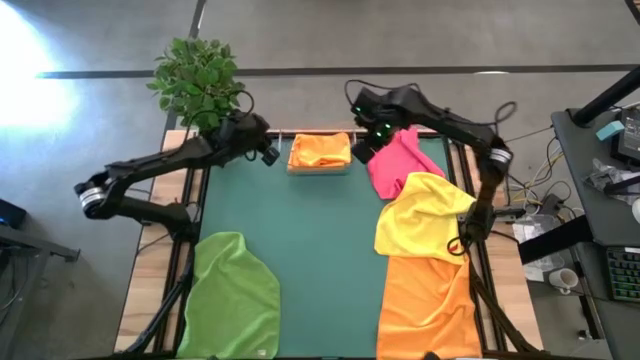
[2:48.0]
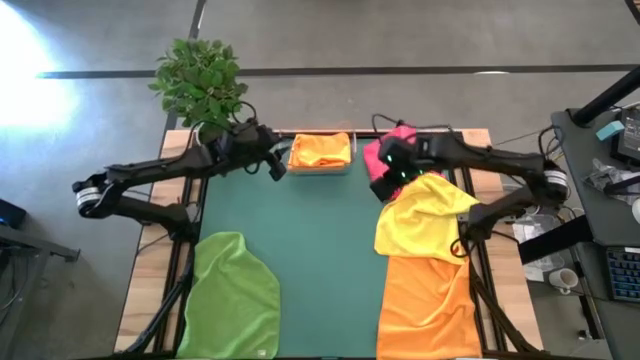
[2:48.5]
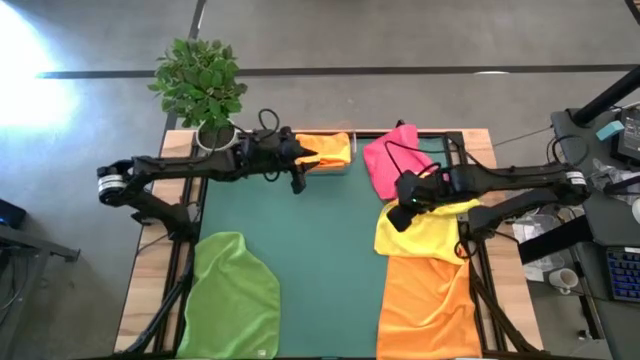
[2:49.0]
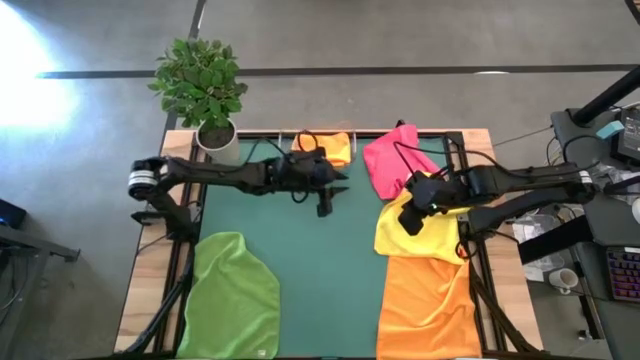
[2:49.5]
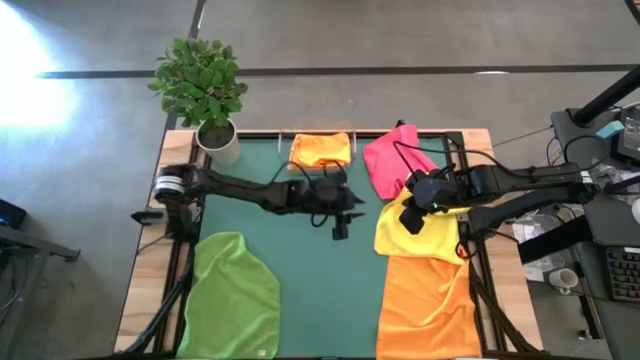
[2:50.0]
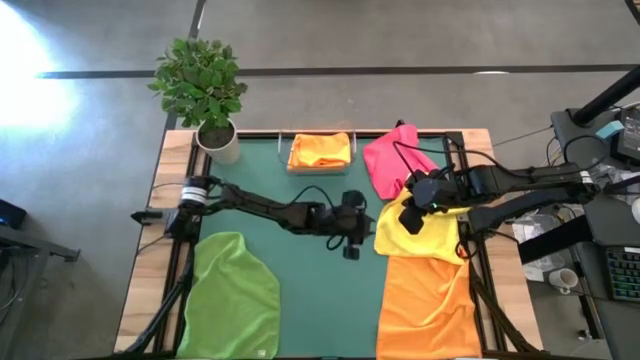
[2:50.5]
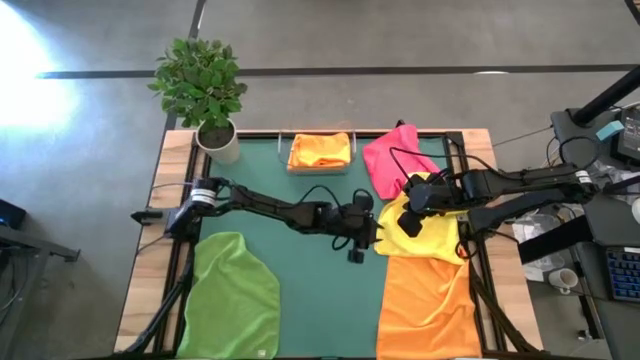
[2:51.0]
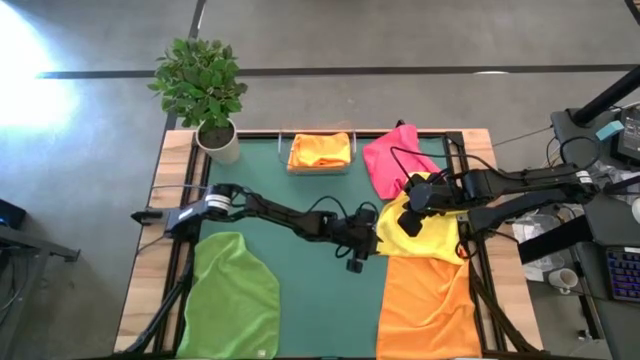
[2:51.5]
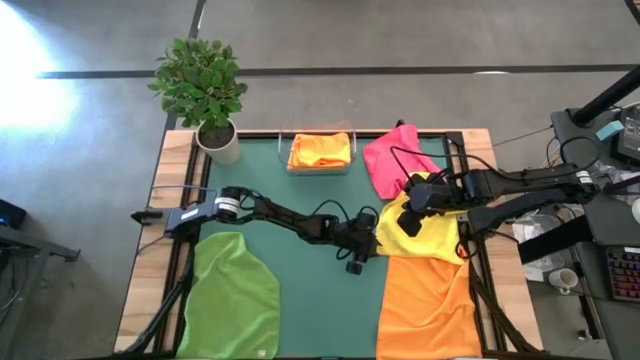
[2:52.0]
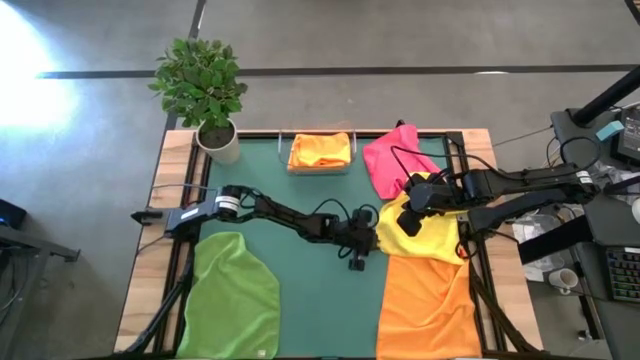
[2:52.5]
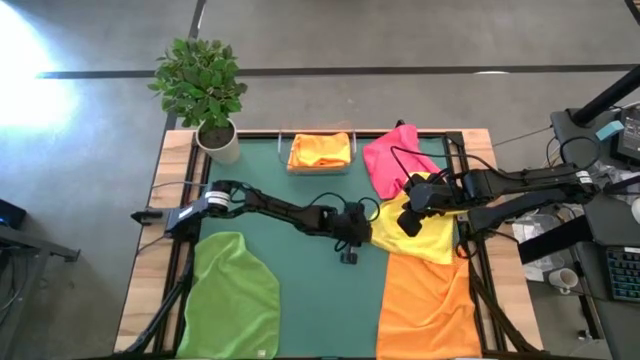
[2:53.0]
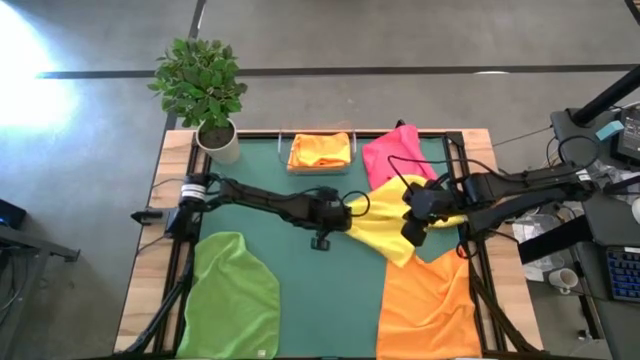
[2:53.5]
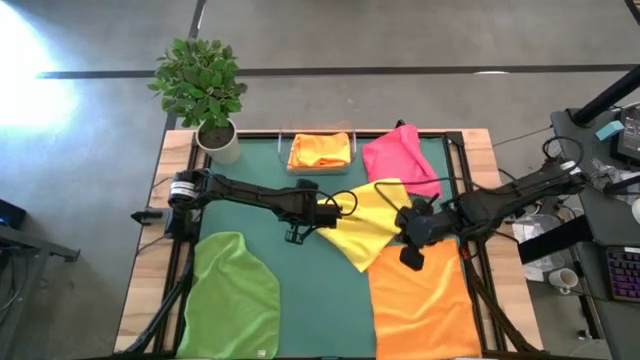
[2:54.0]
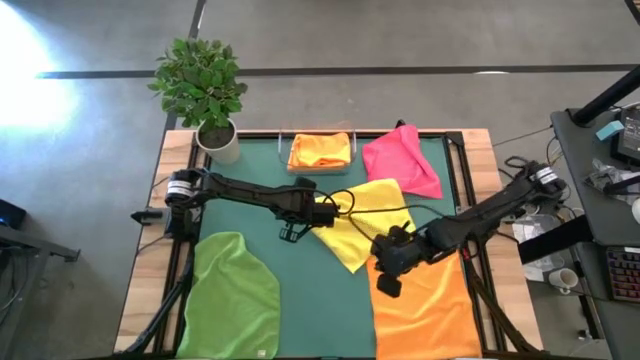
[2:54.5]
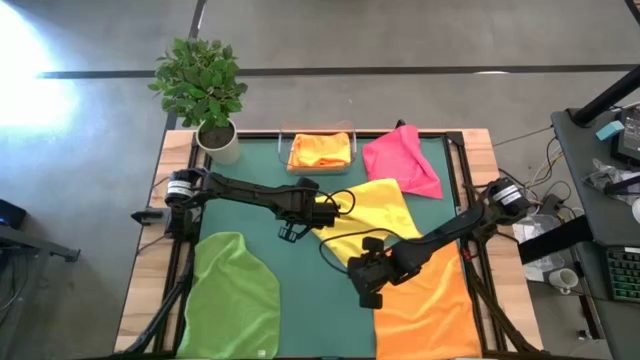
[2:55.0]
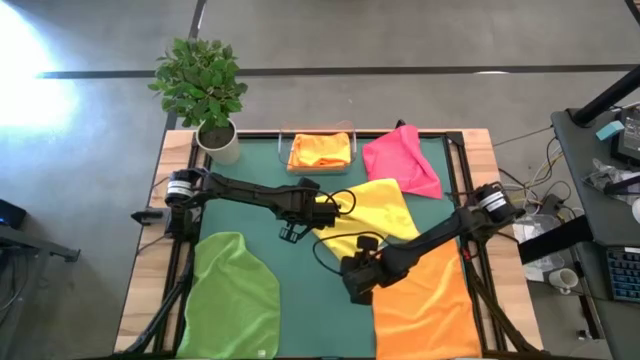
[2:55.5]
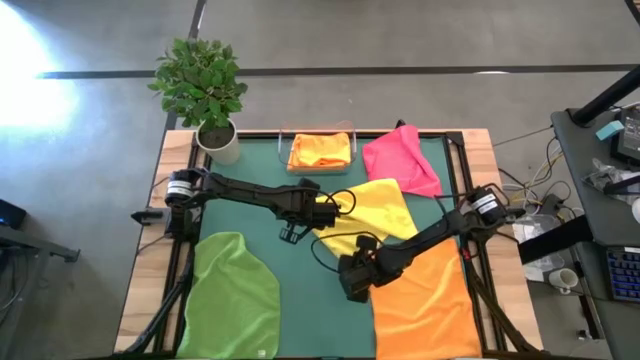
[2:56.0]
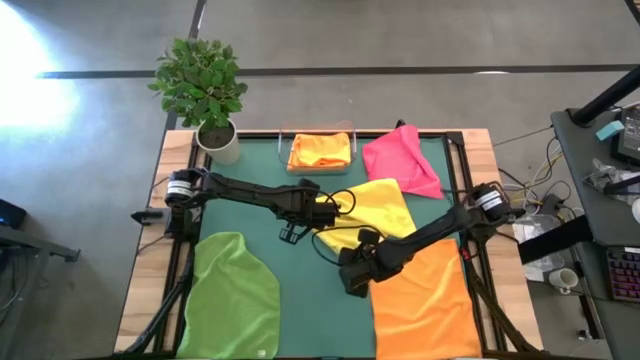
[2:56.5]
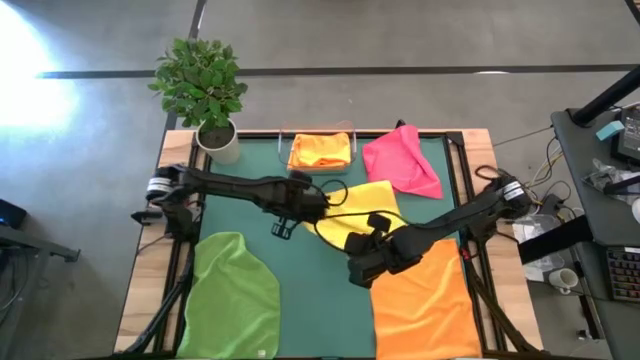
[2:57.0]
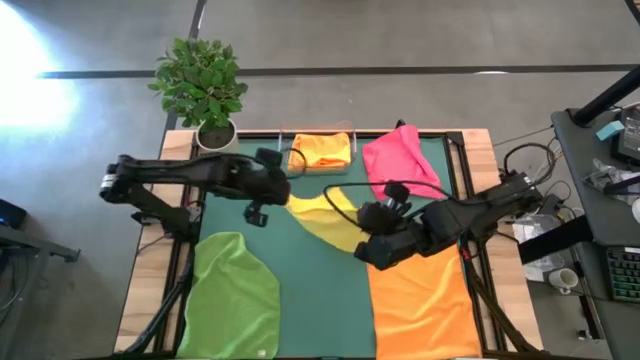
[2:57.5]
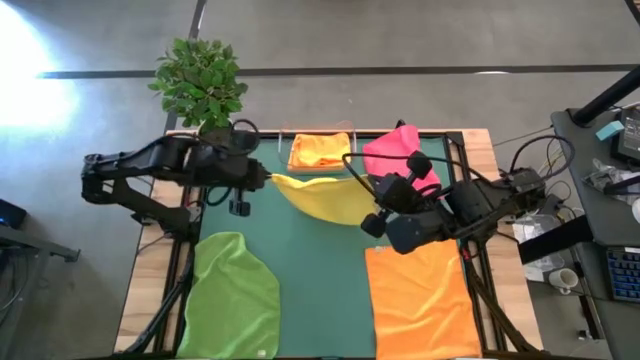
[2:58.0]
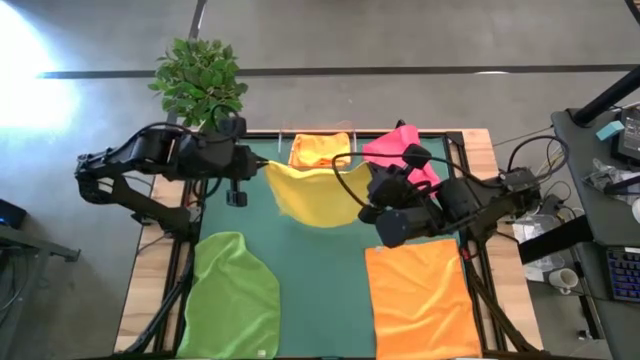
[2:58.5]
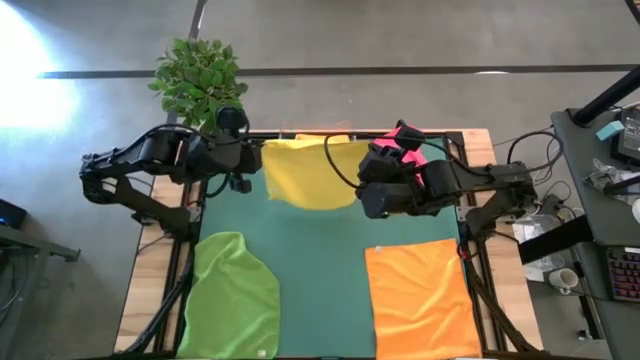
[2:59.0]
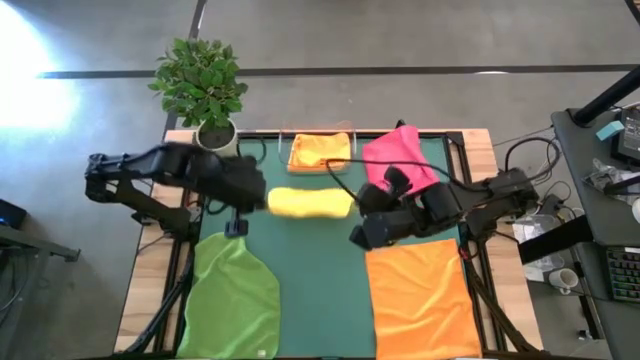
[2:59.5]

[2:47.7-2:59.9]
Task: Fold microfiber towels
Fold the yellow microfiber towel

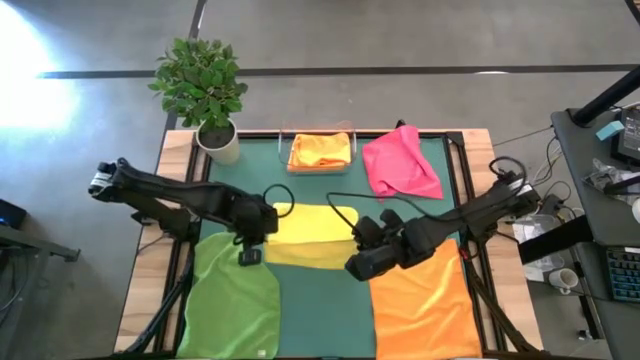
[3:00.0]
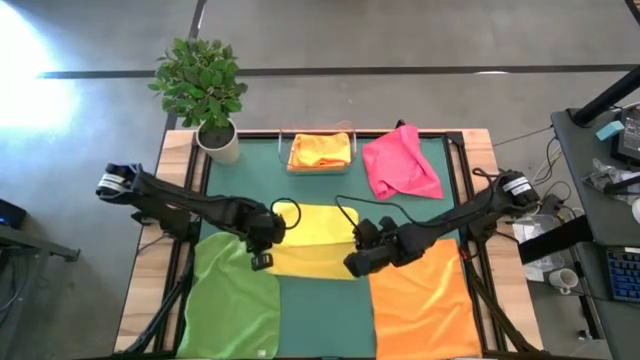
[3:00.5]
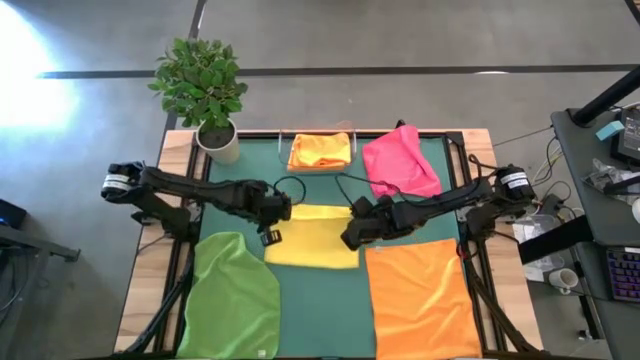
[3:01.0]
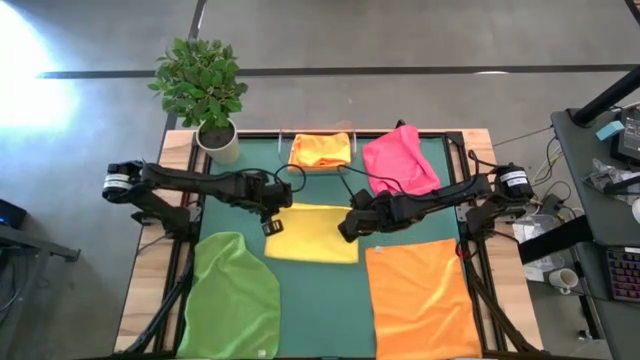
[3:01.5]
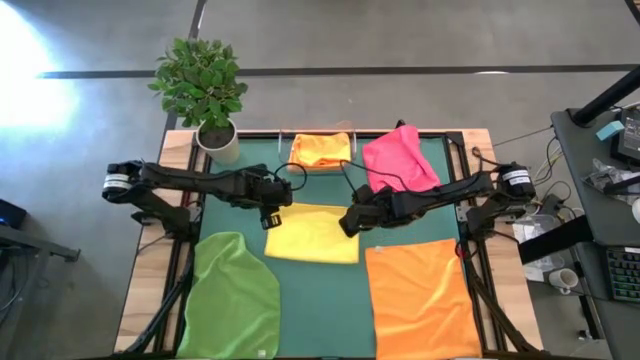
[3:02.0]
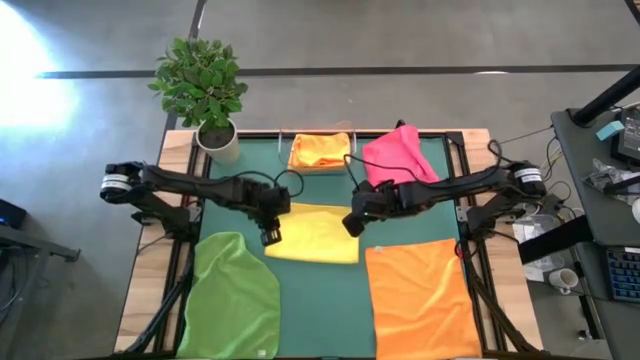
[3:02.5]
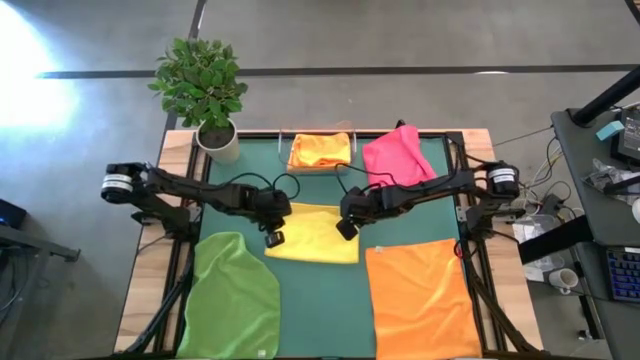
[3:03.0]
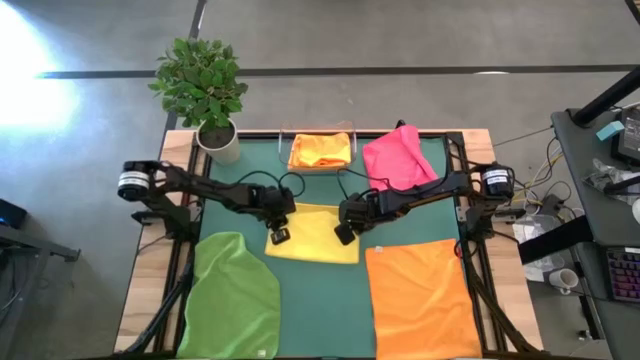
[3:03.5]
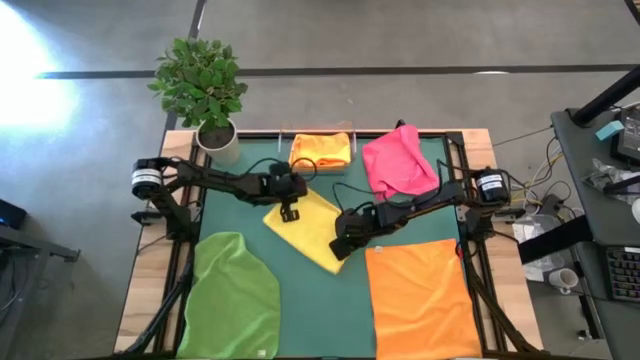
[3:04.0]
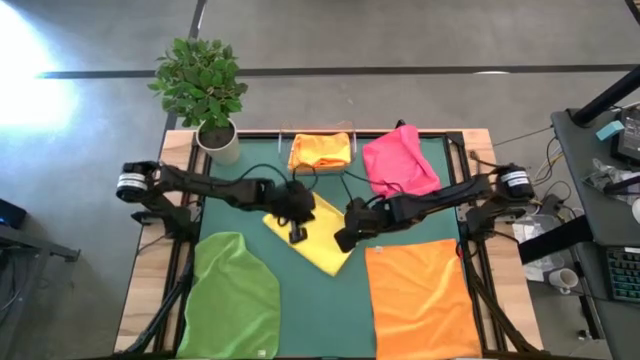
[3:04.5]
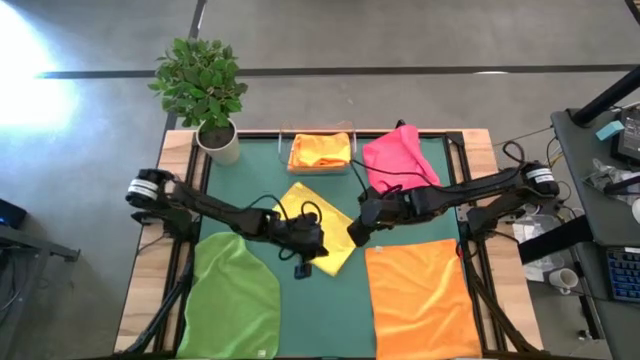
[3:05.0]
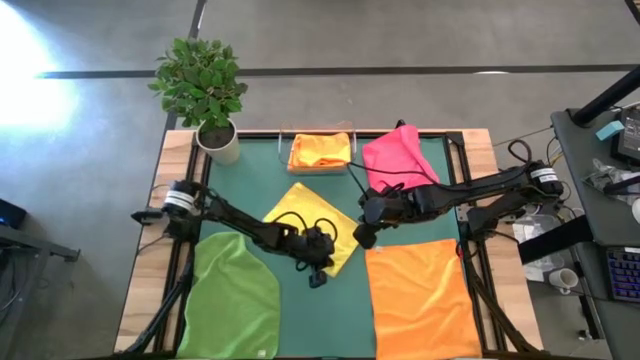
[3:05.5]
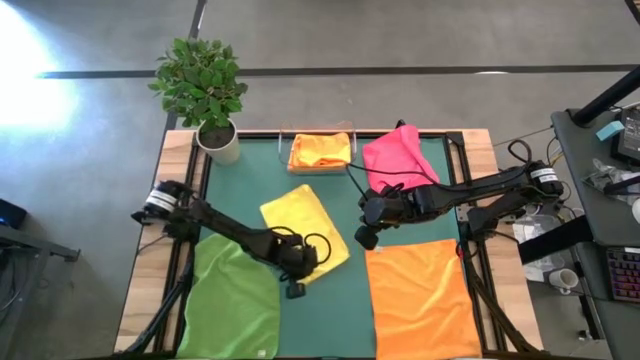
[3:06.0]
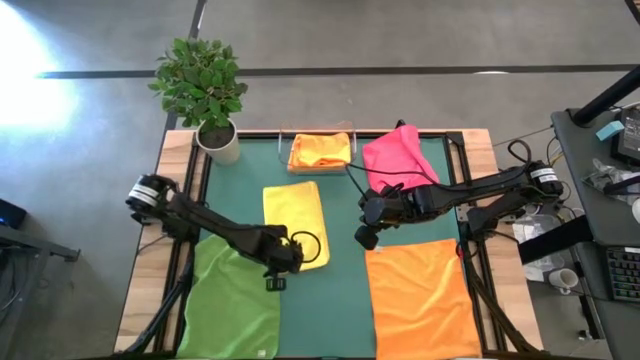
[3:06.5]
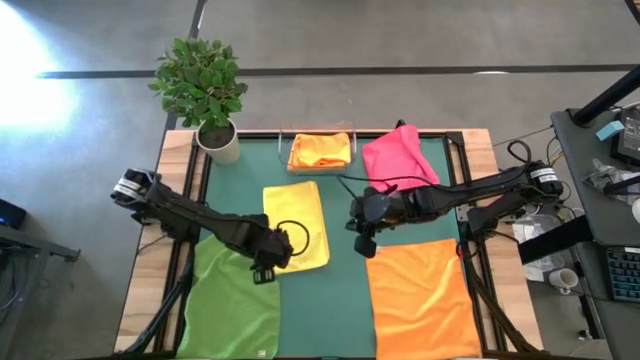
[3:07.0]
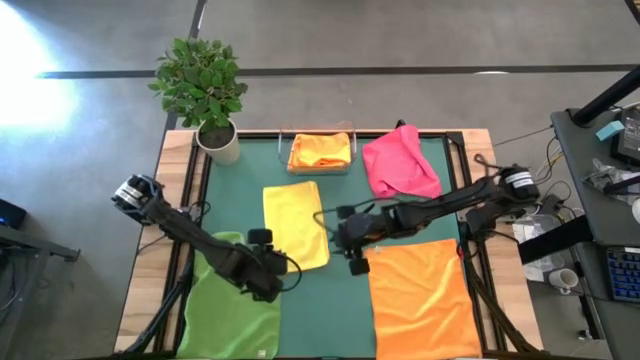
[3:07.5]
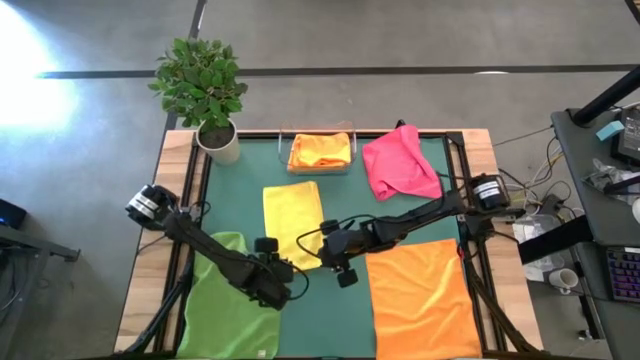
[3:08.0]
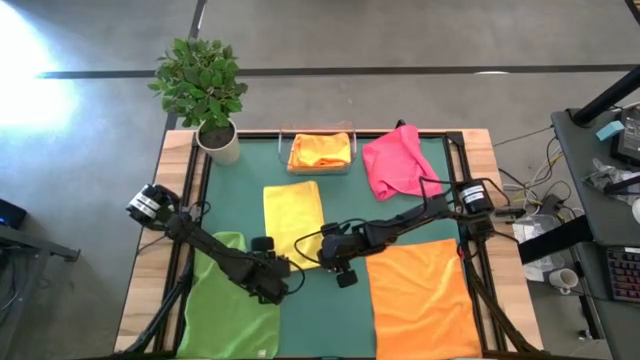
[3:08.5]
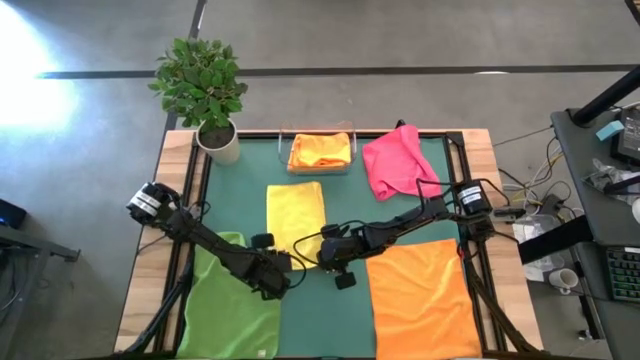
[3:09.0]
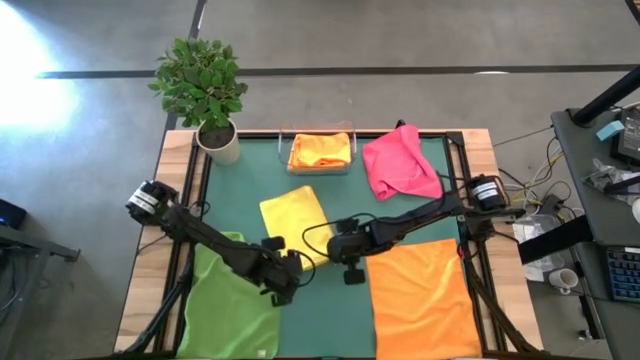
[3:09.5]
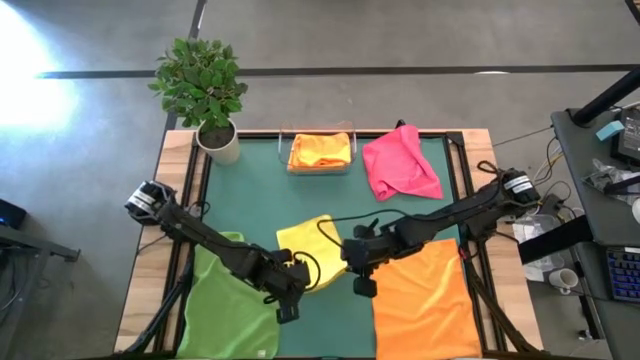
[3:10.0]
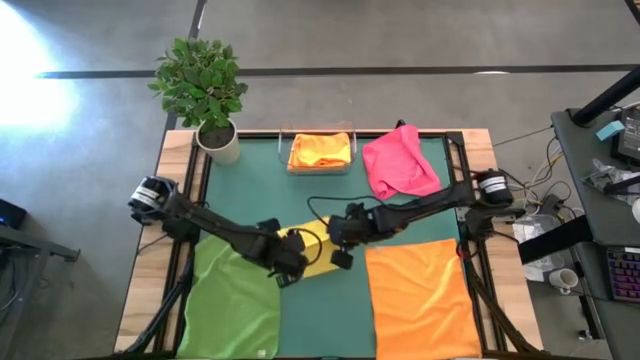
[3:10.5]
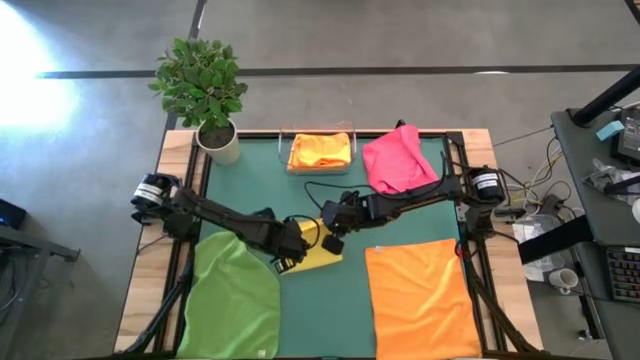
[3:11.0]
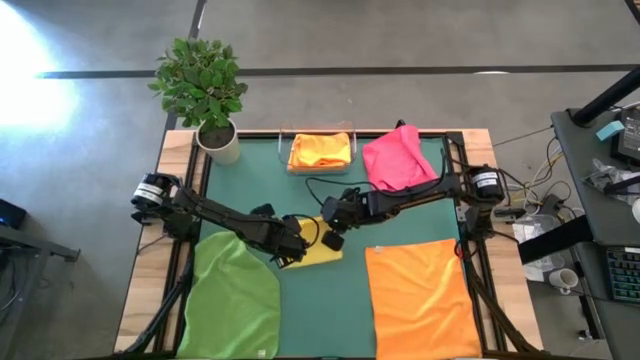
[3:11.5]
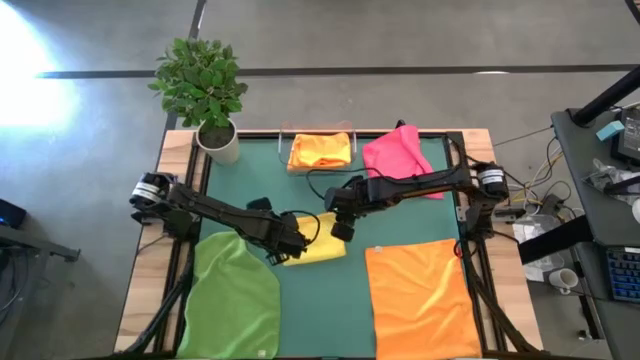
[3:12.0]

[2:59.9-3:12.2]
Fold the yellow microfiber towel
